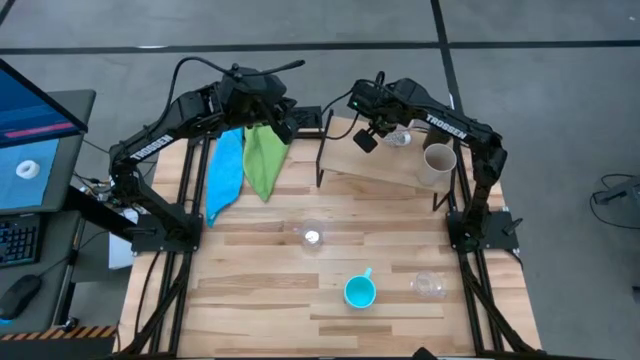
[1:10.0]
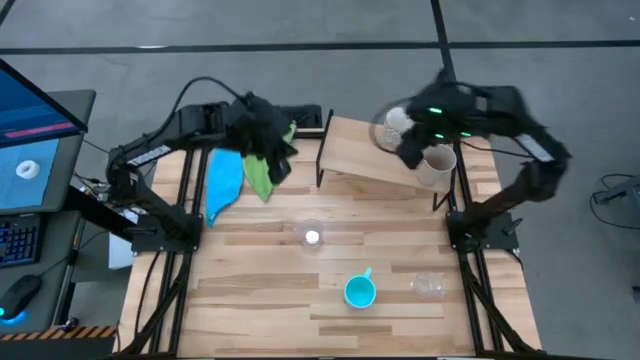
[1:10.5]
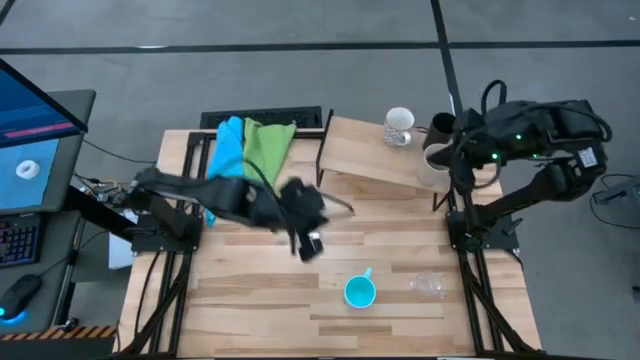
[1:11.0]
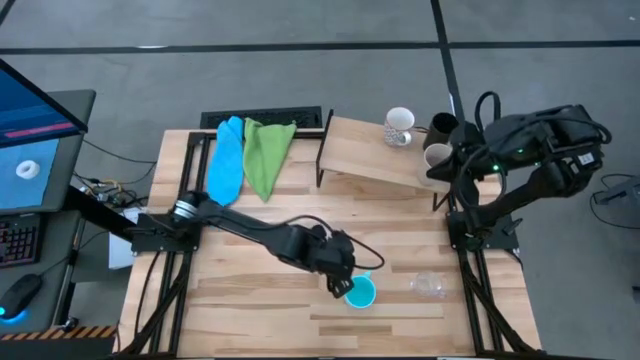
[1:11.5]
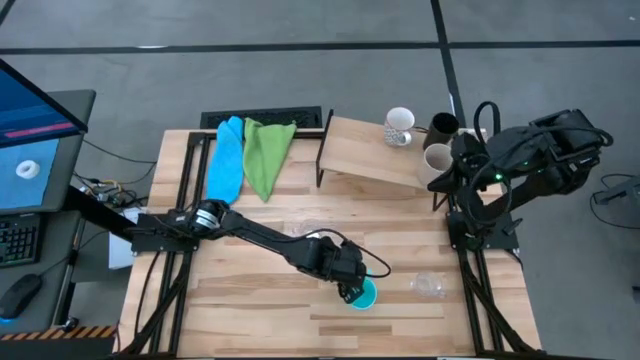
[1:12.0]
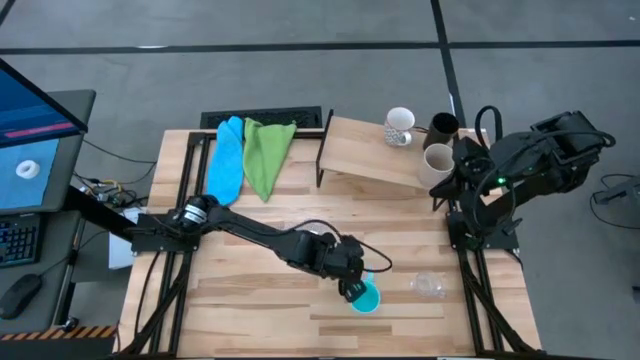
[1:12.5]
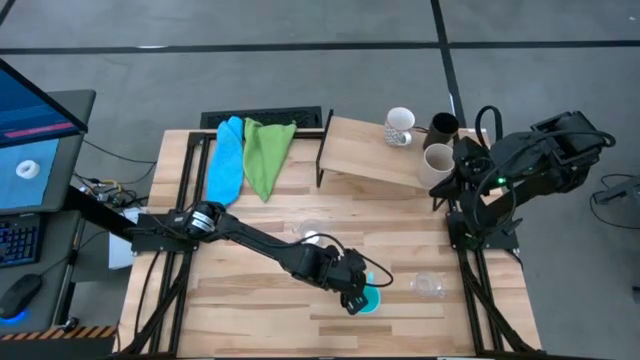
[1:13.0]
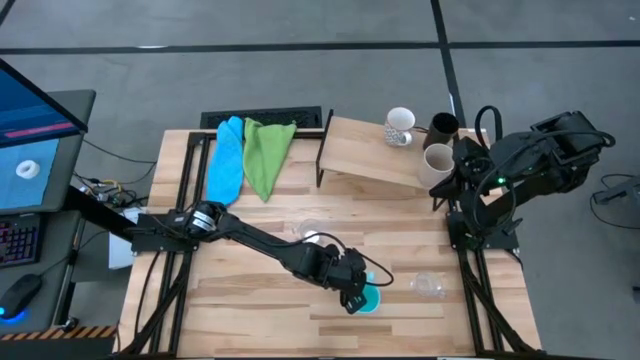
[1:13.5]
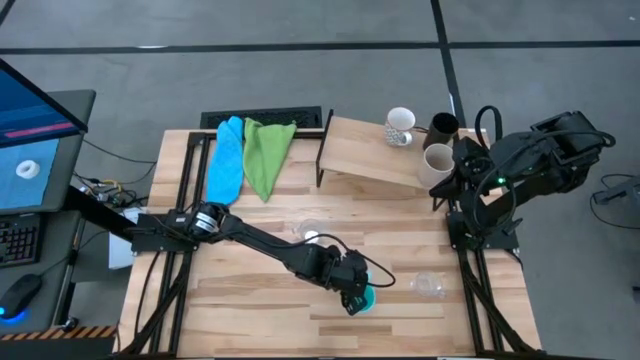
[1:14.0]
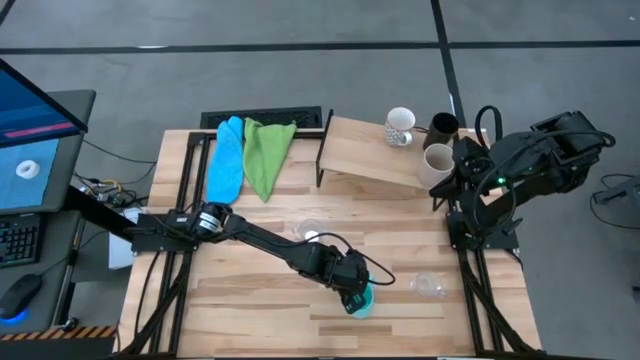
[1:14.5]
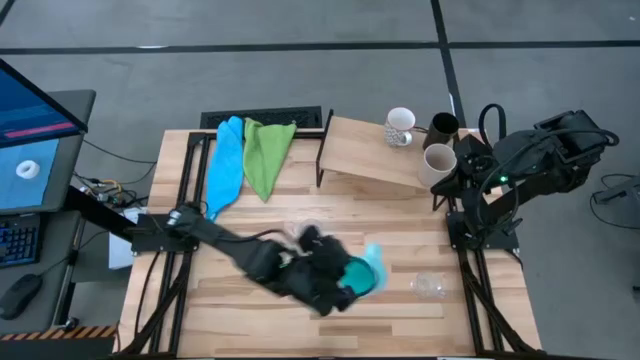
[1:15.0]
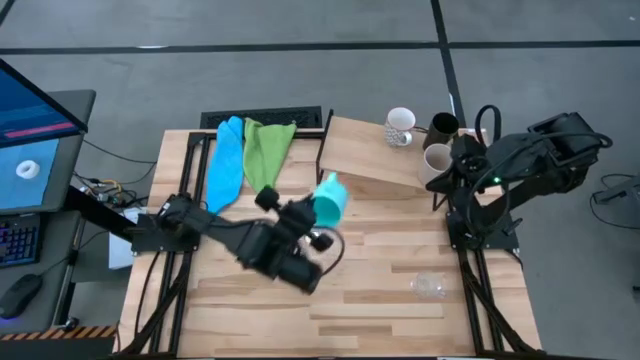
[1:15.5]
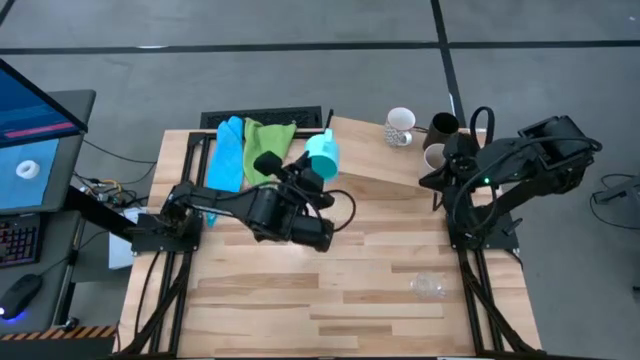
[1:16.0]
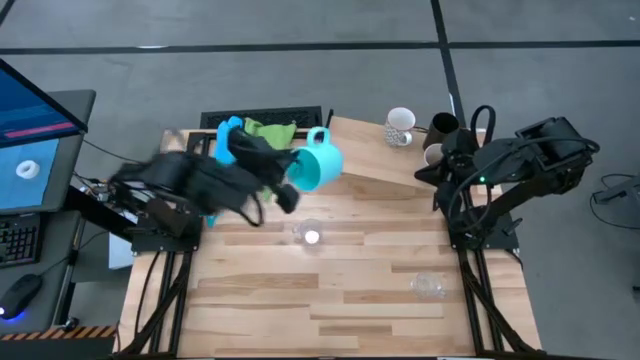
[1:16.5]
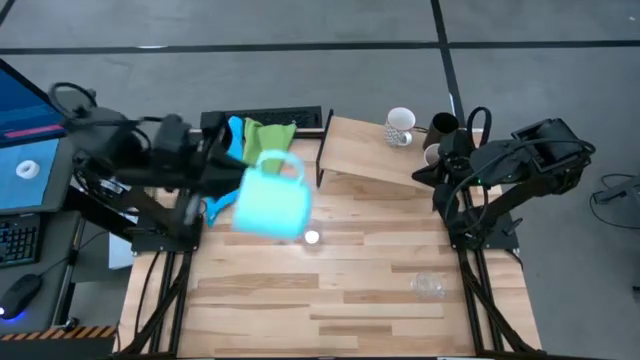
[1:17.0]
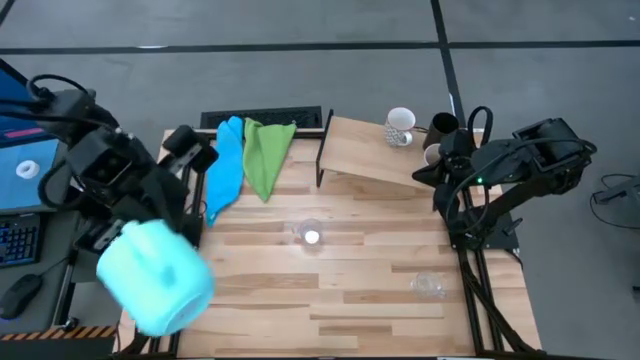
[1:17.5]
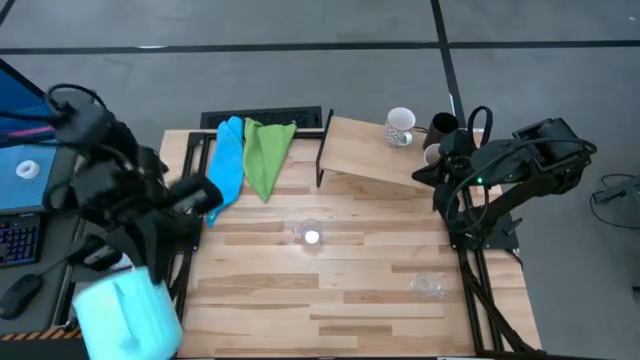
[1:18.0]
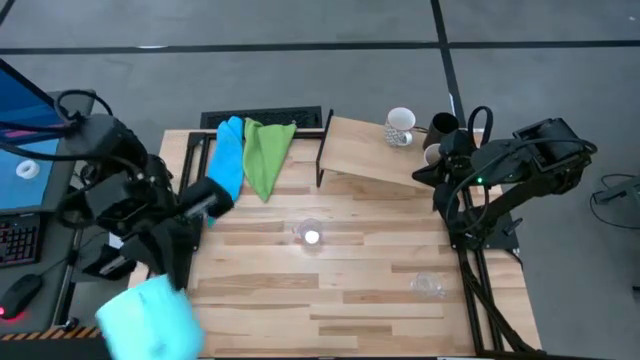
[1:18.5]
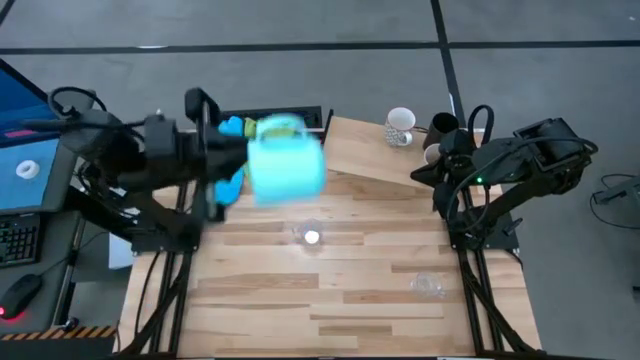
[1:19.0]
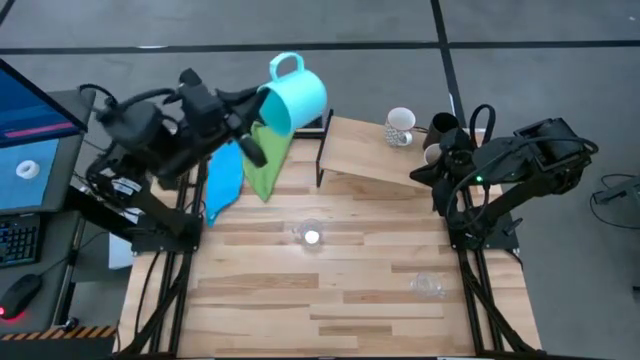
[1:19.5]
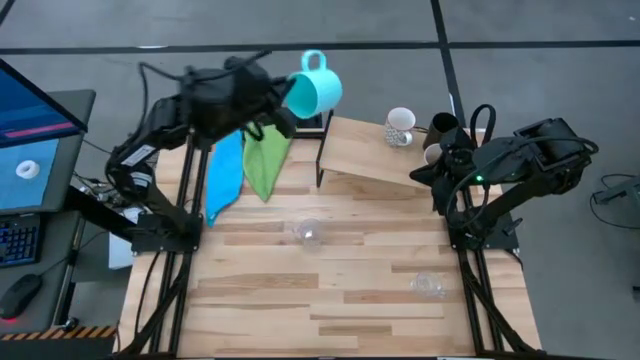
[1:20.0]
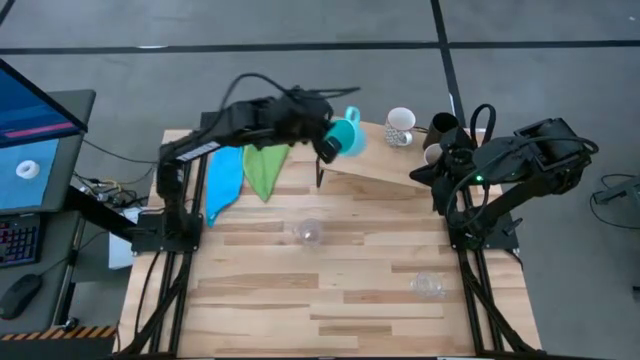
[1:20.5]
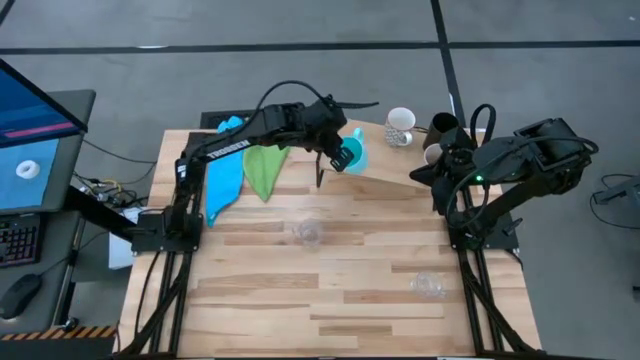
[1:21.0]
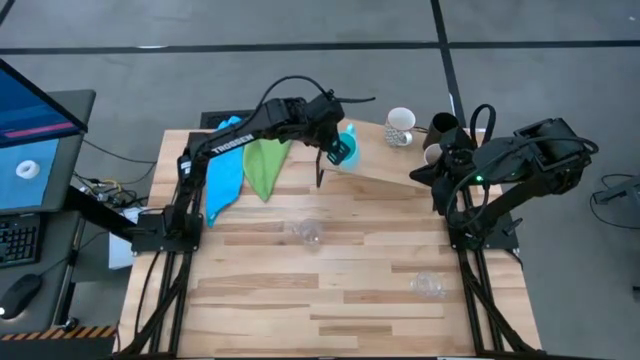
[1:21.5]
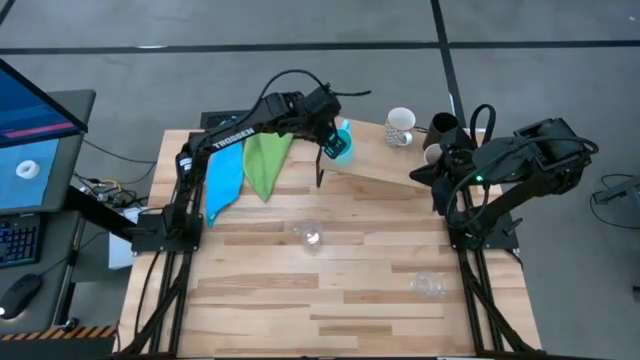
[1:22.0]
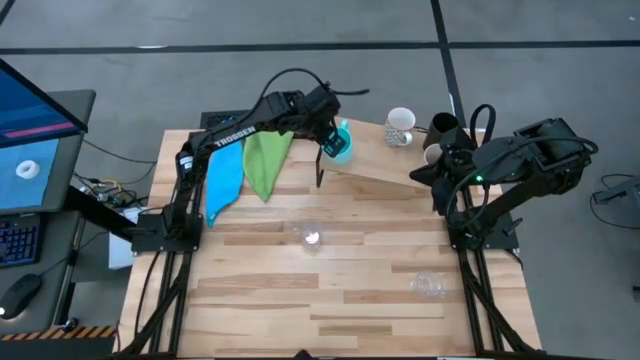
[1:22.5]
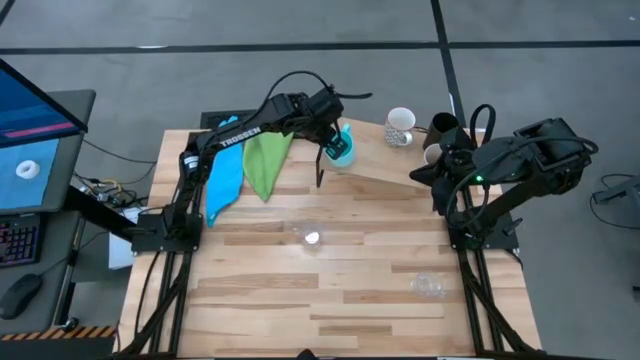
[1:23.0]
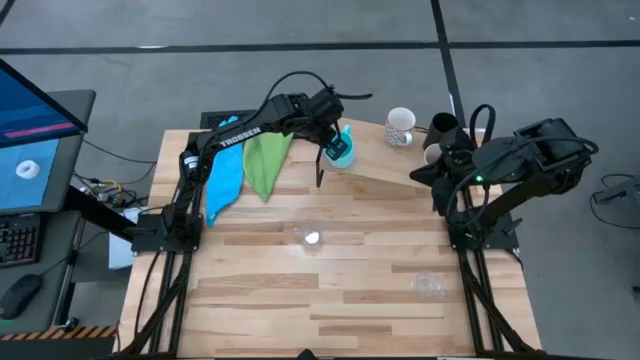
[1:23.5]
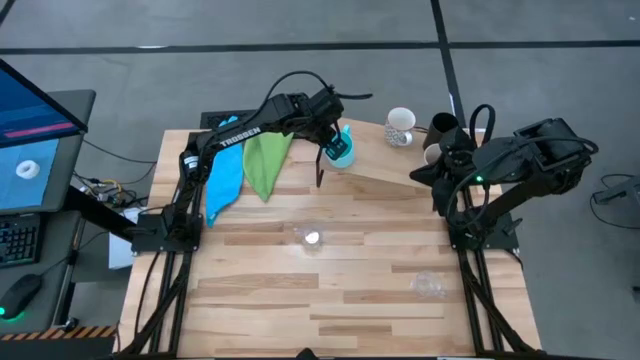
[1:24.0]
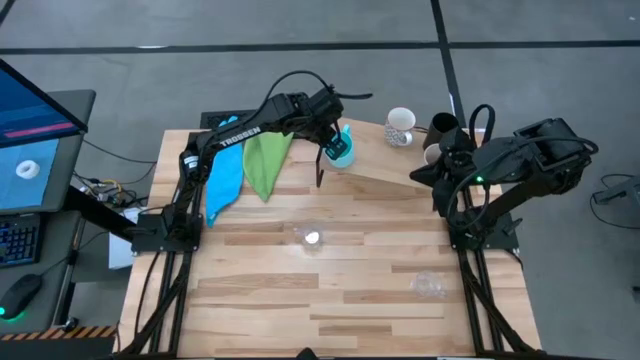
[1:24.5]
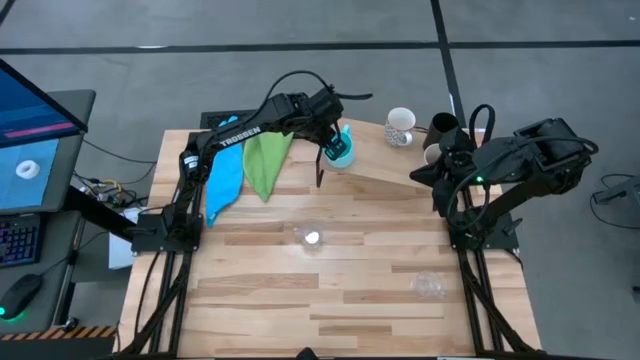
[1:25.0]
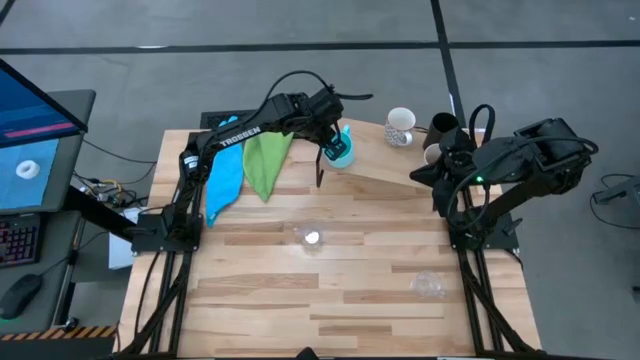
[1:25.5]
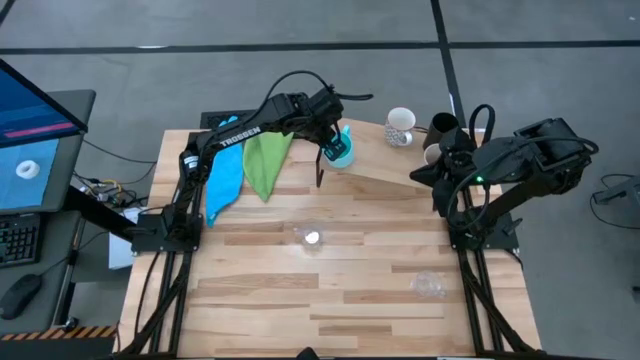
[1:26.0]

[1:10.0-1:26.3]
Task: Stack small to large cups/mugs on shelf
Put the blue mug on the shelf
